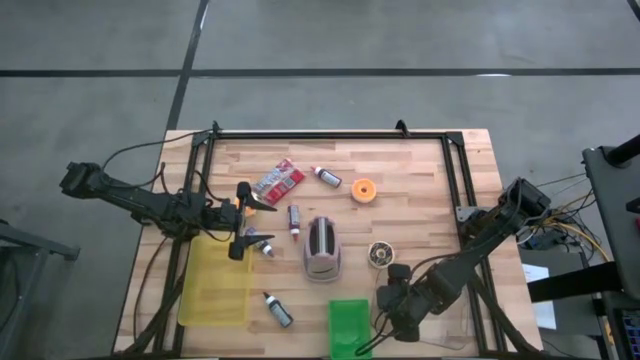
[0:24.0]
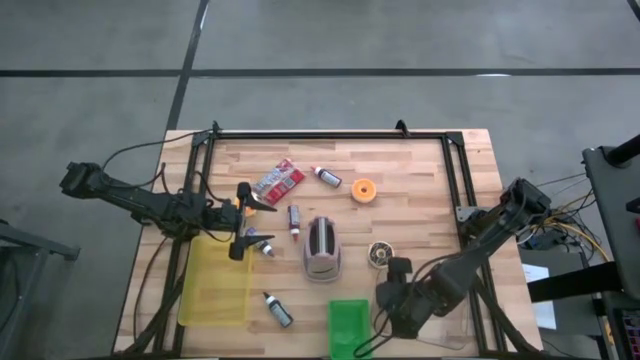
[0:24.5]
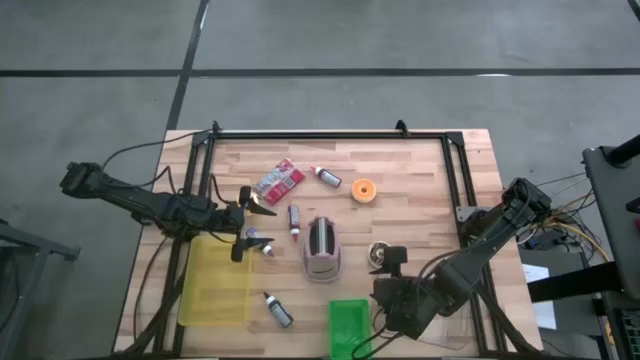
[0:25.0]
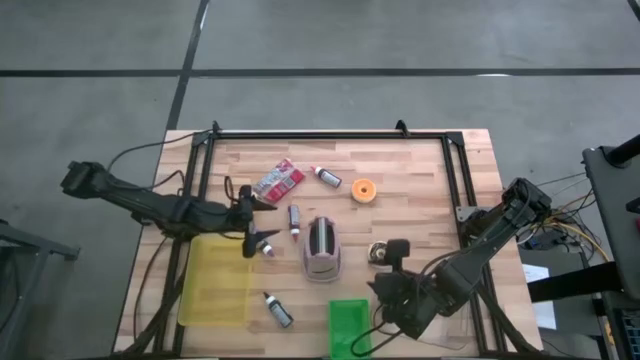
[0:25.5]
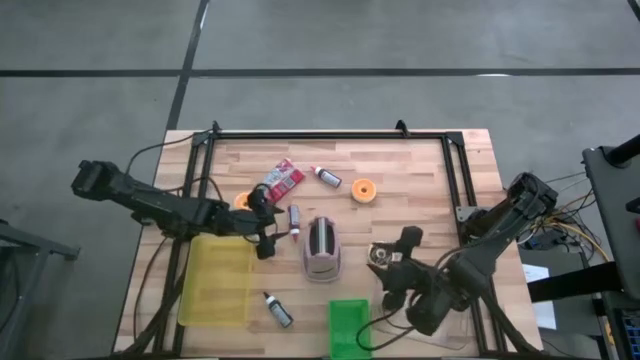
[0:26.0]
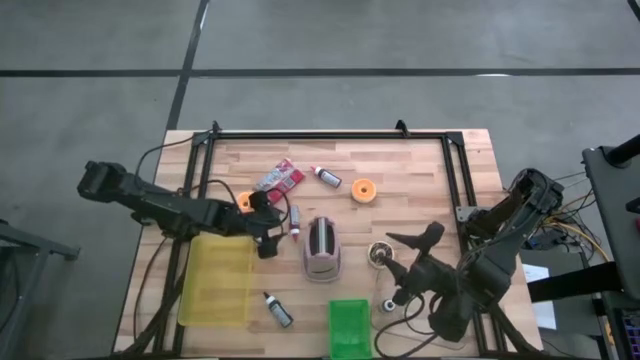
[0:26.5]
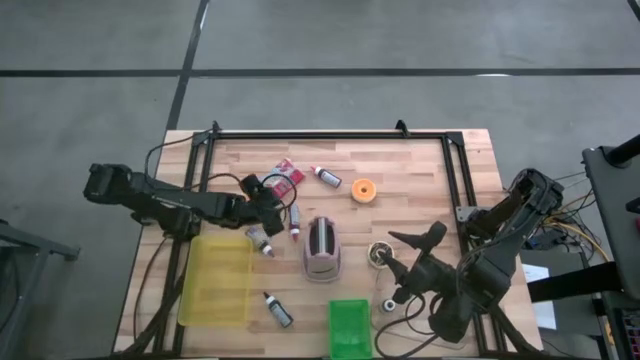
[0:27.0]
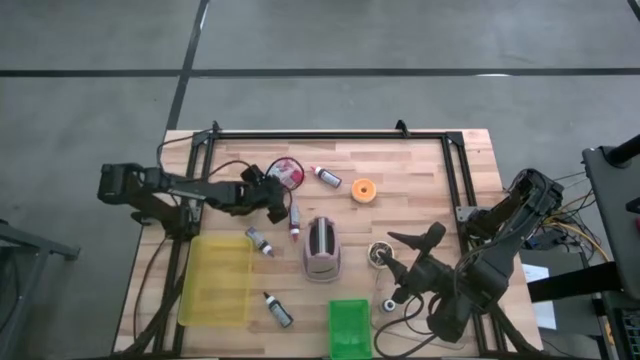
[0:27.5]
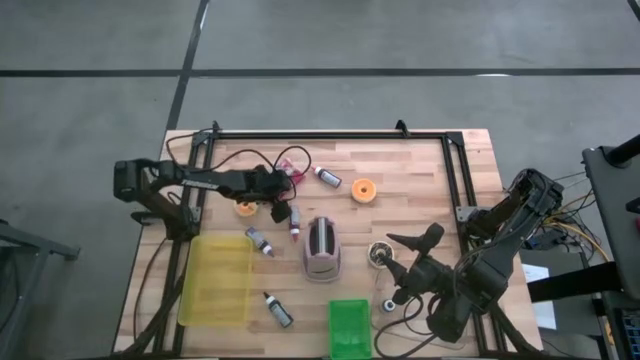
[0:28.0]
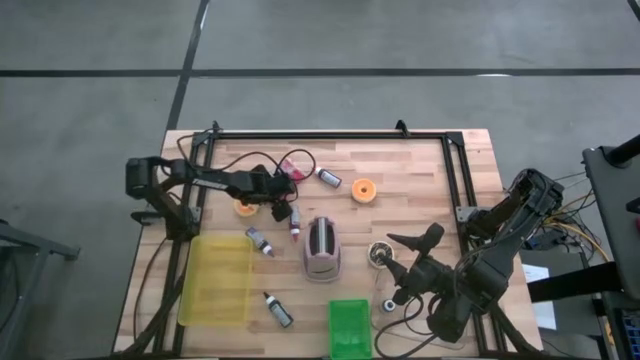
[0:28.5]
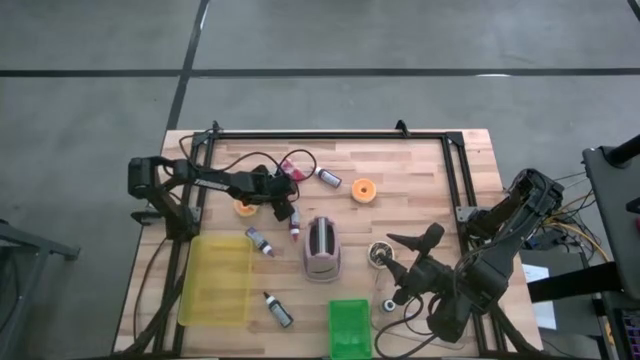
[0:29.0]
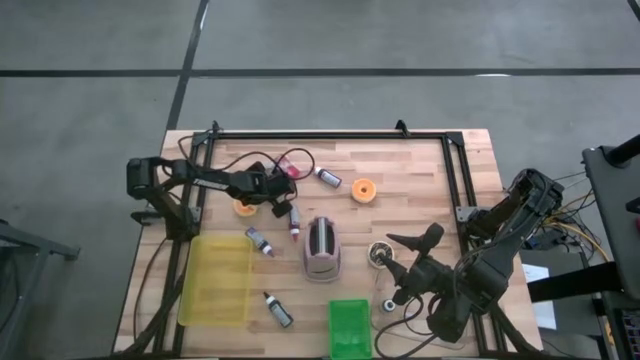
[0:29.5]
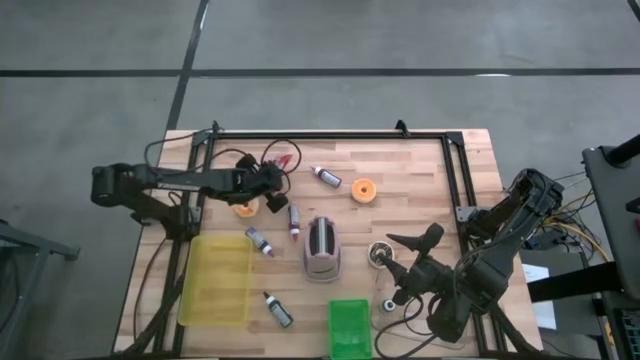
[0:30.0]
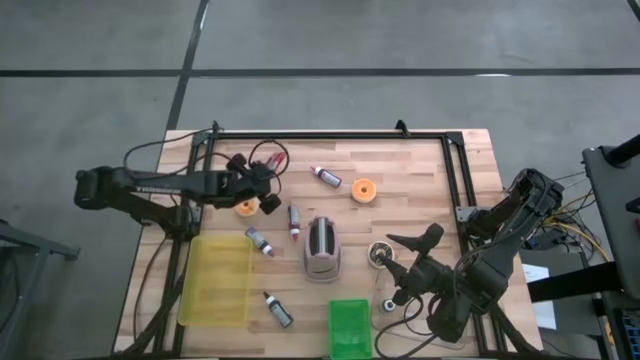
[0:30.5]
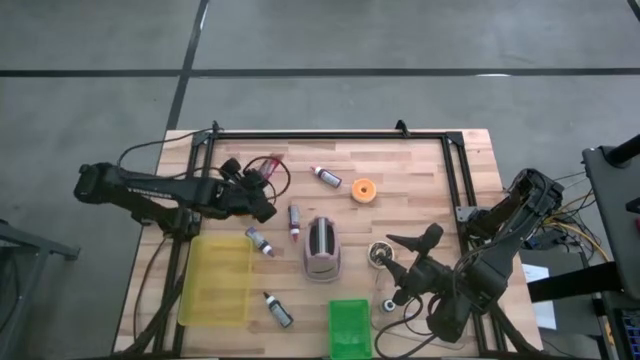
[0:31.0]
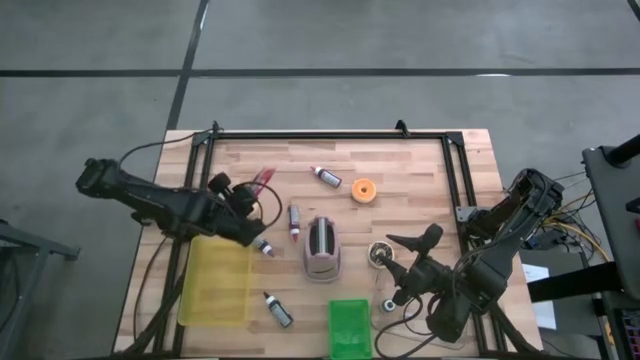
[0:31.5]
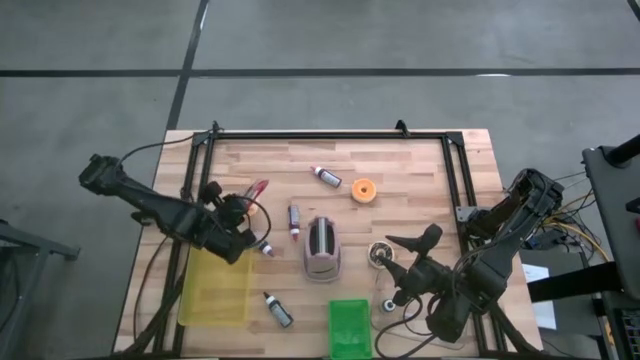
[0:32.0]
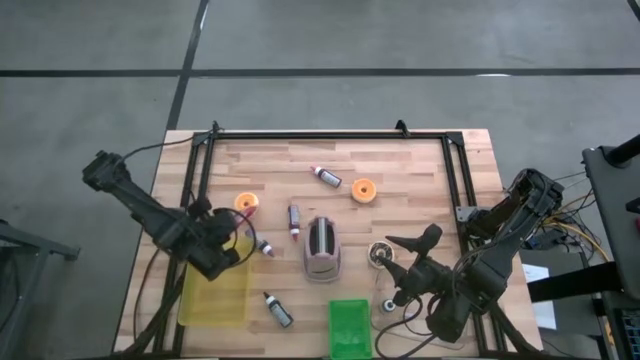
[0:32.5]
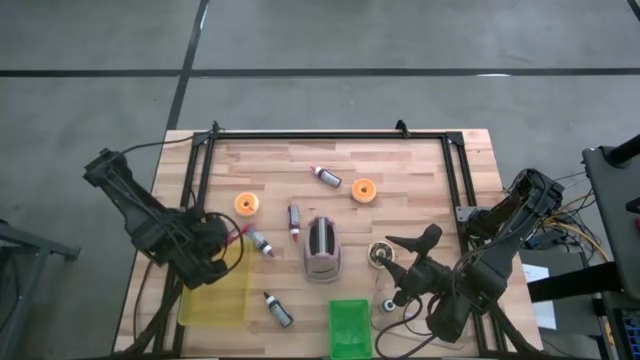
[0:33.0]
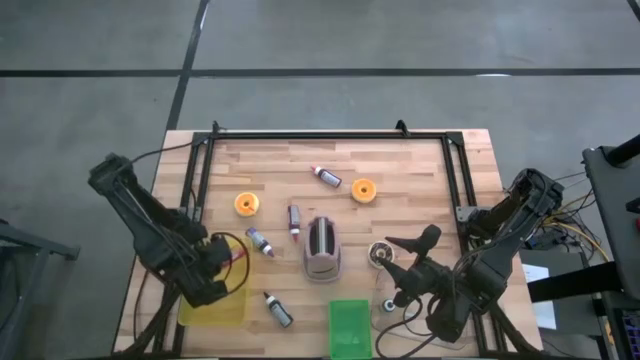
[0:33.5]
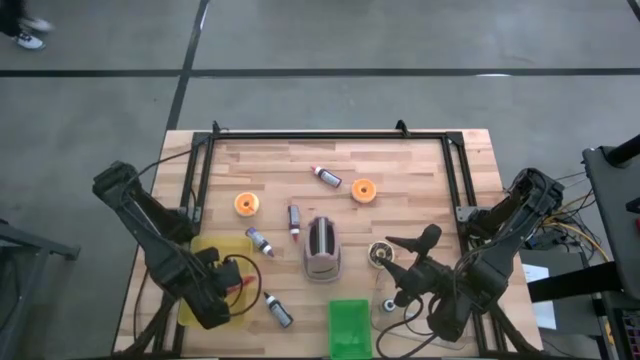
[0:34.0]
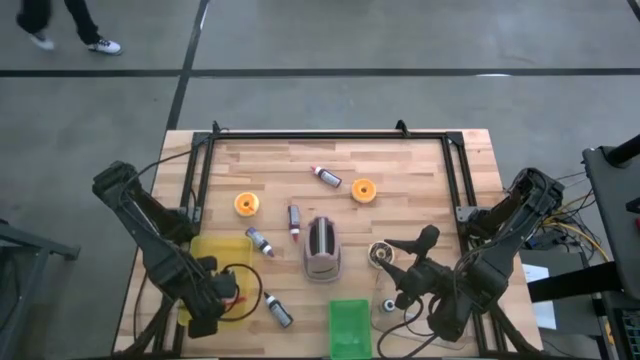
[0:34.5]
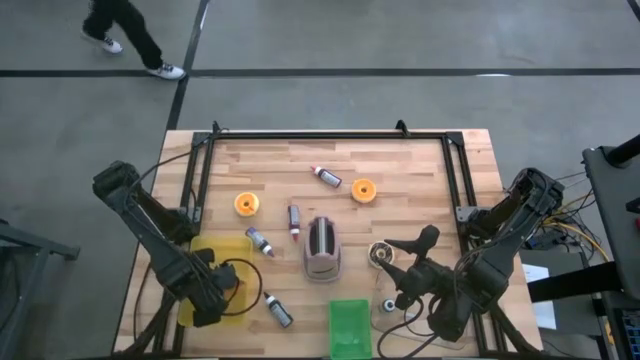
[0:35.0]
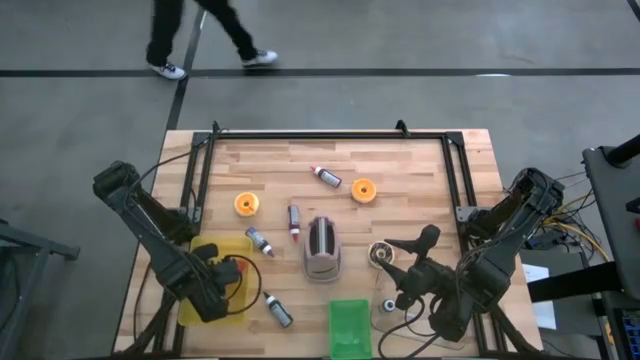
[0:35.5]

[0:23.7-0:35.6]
Task: Pick & Place Food Item
Put the red popcorn bag into the yellow bin

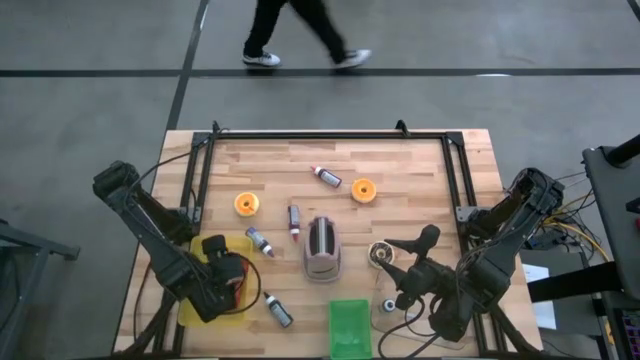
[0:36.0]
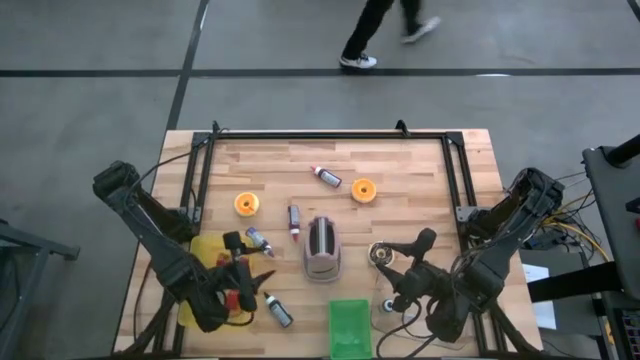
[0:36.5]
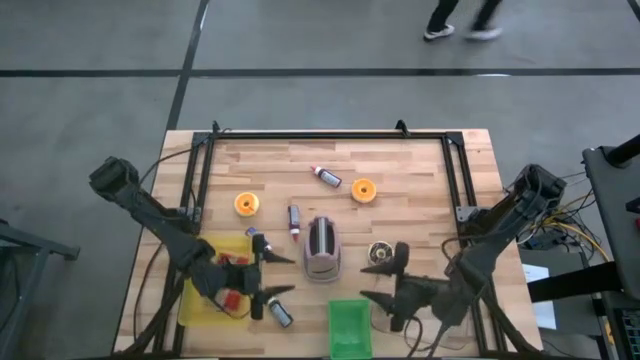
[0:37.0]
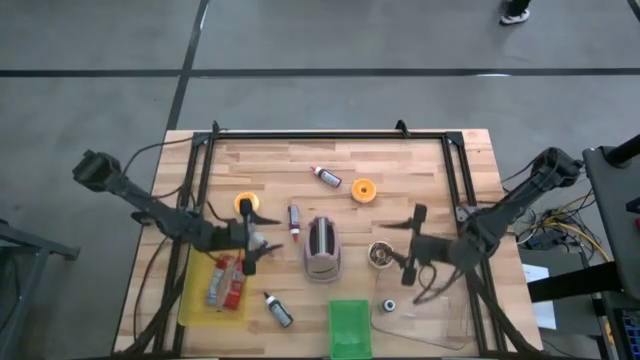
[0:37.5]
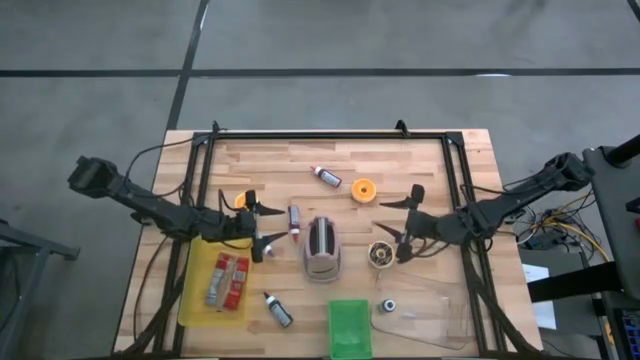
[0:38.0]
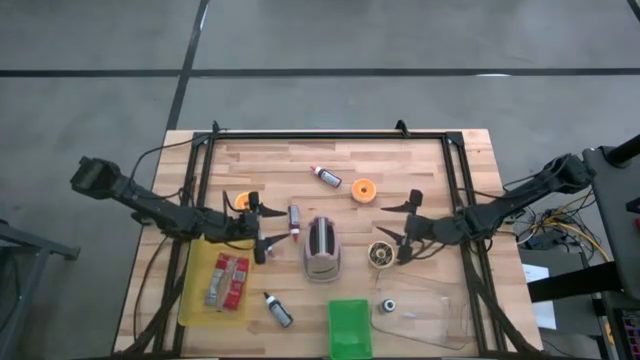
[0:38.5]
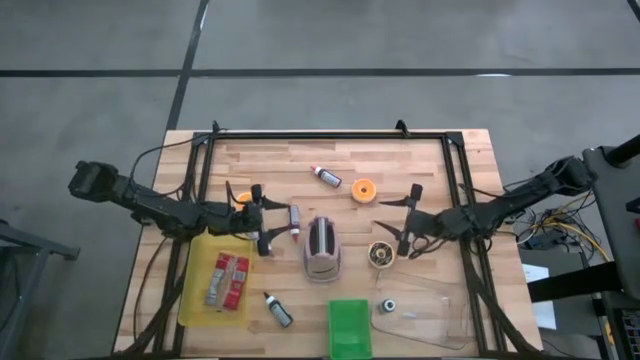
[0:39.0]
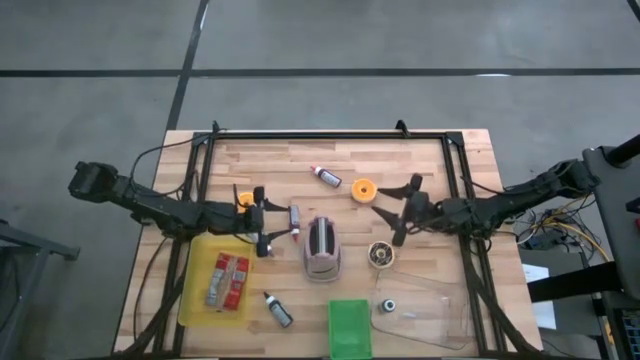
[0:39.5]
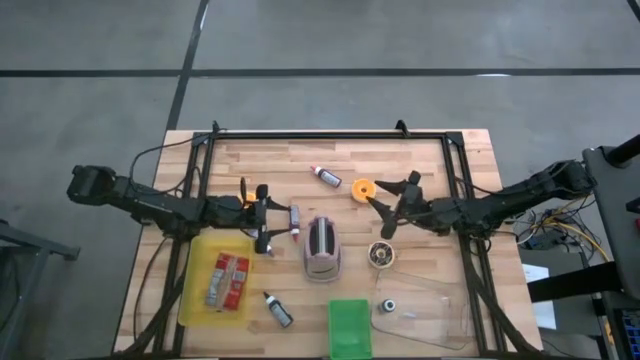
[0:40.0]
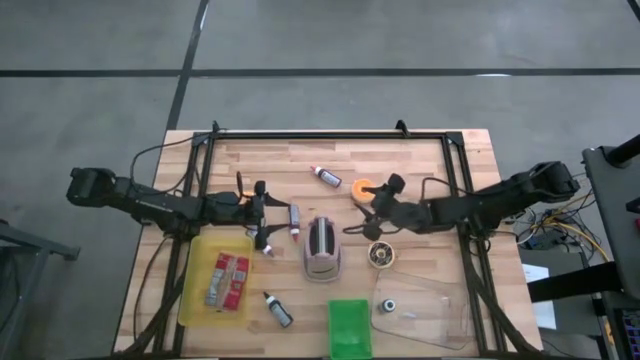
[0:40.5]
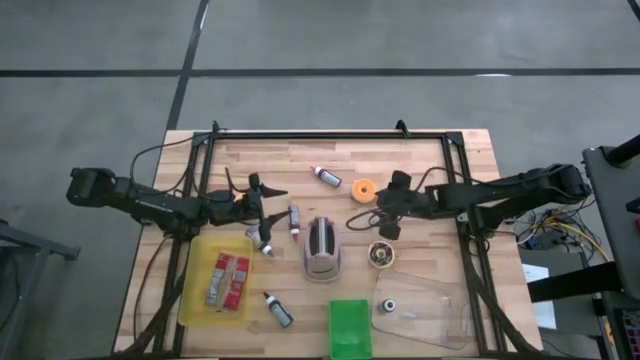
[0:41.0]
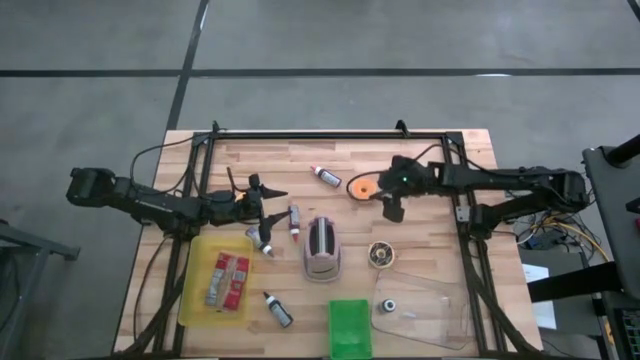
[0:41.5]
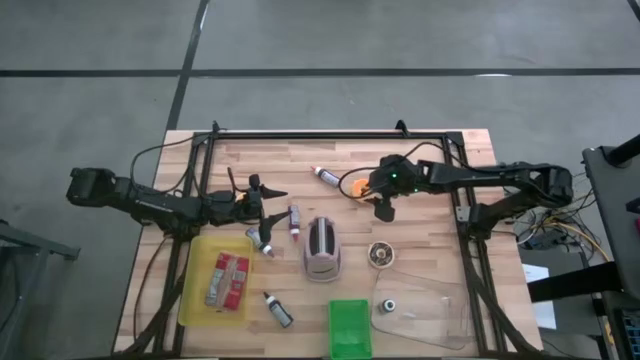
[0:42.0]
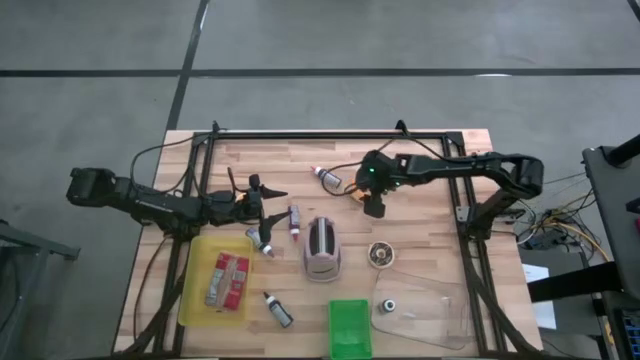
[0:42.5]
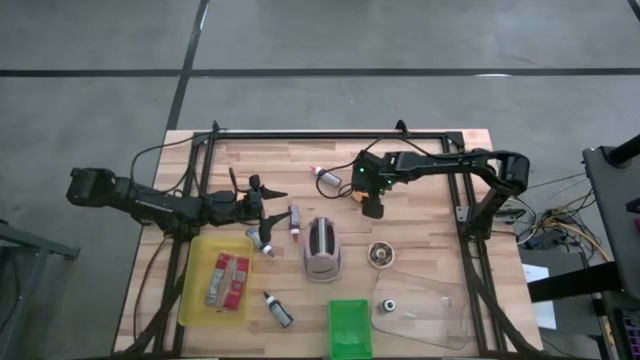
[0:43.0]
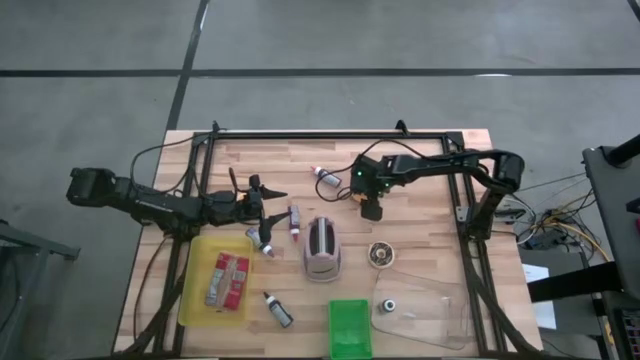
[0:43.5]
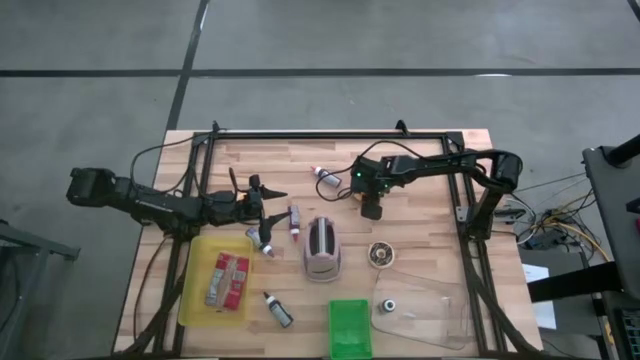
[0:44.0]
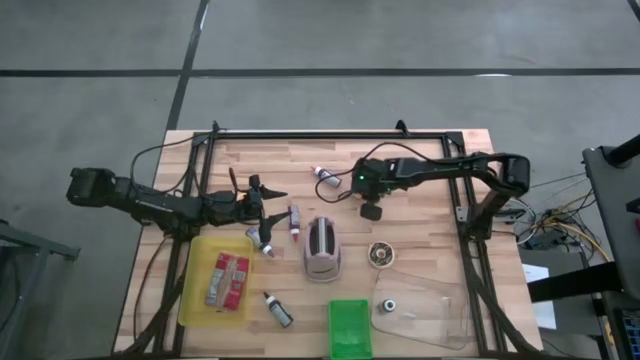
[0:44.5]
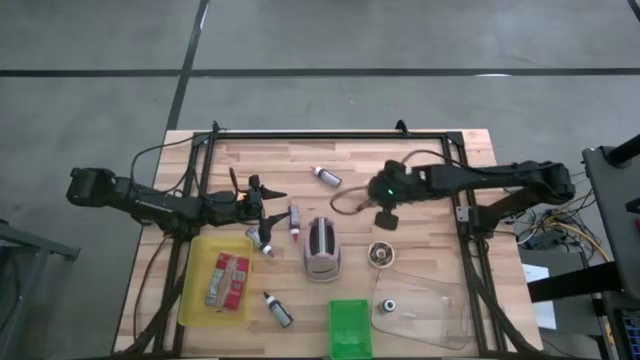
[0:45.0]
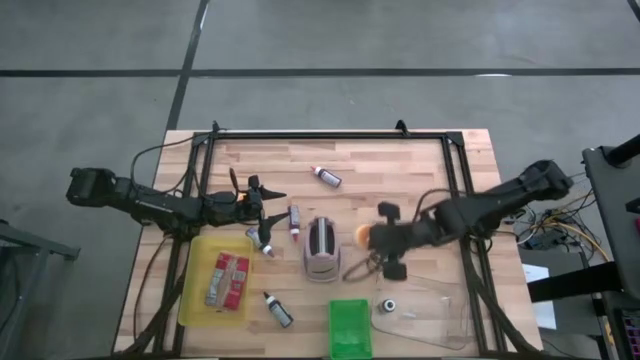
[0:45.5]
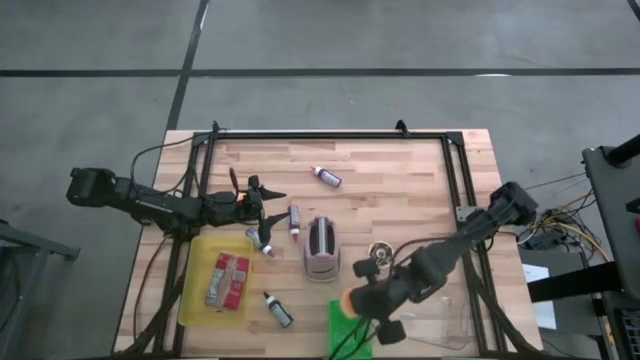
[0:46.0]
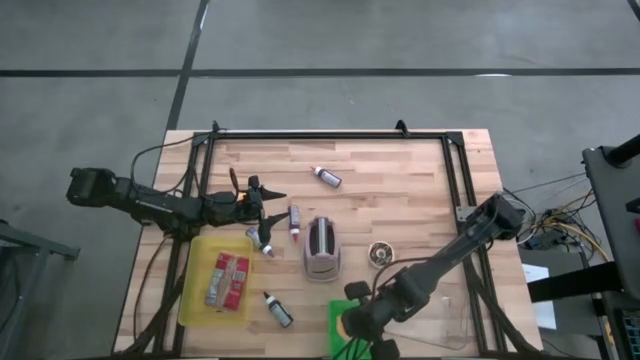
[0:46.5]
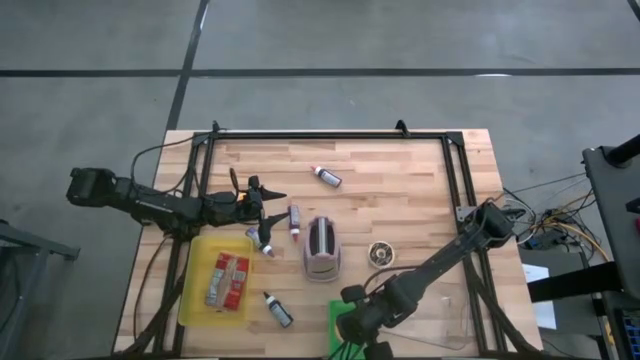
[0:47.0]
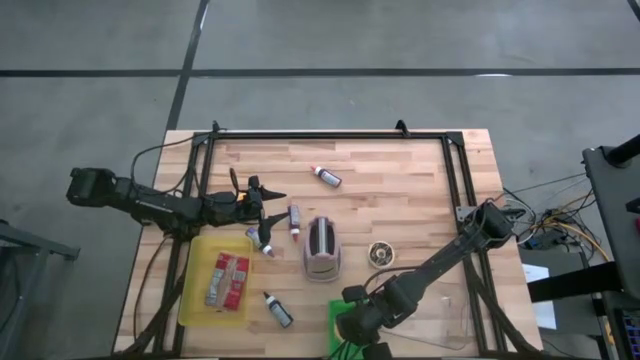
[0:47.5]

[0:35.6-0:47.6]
Put the right yellow donut into the green bin
